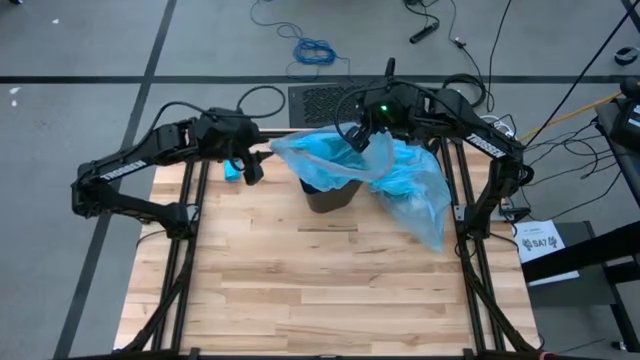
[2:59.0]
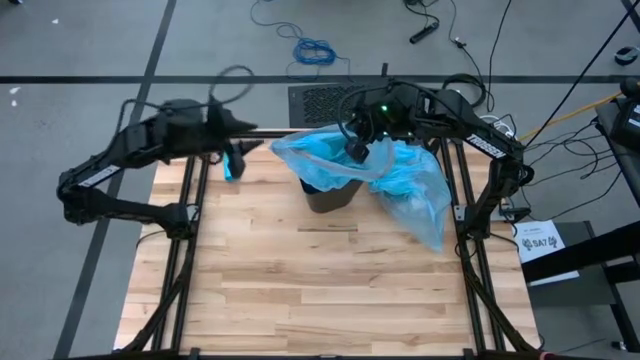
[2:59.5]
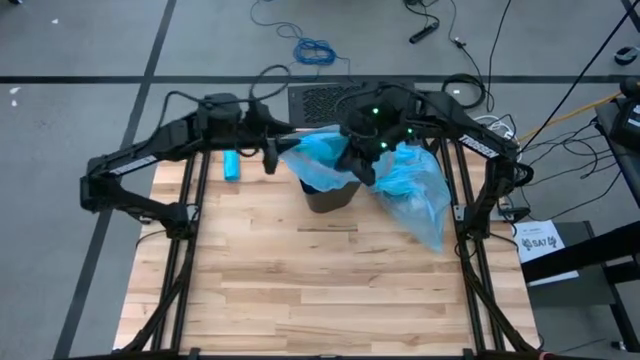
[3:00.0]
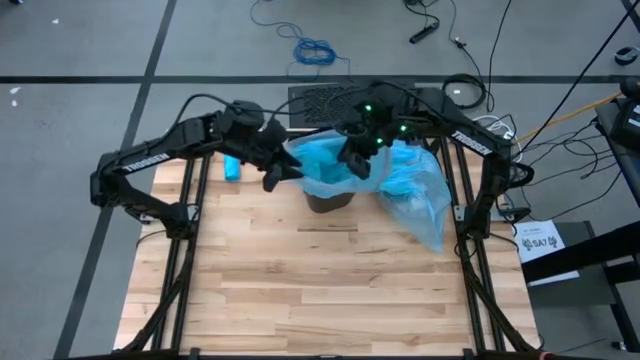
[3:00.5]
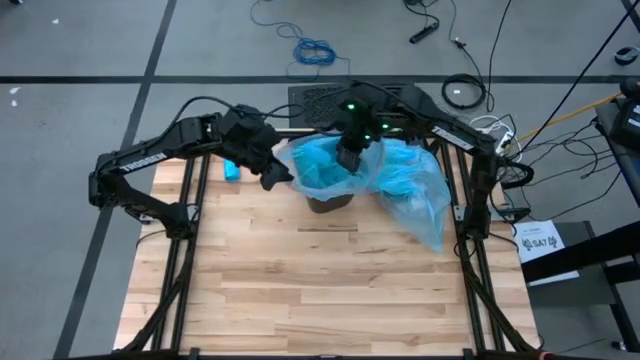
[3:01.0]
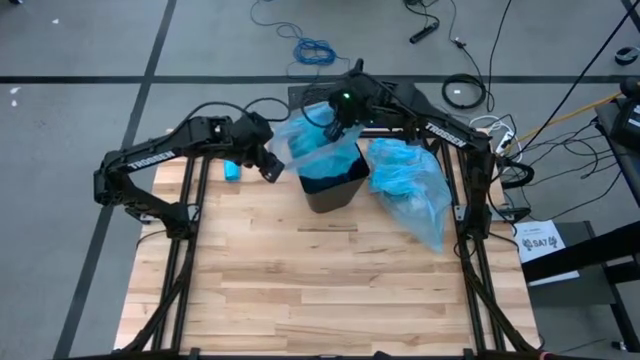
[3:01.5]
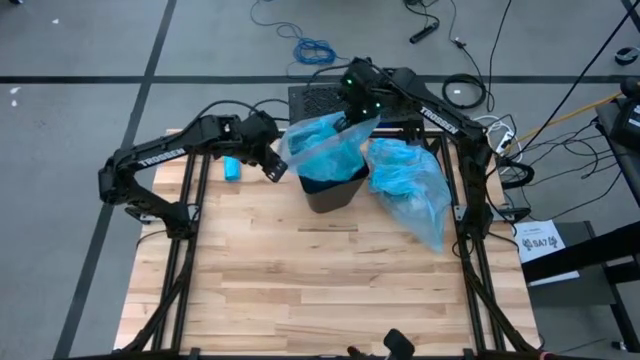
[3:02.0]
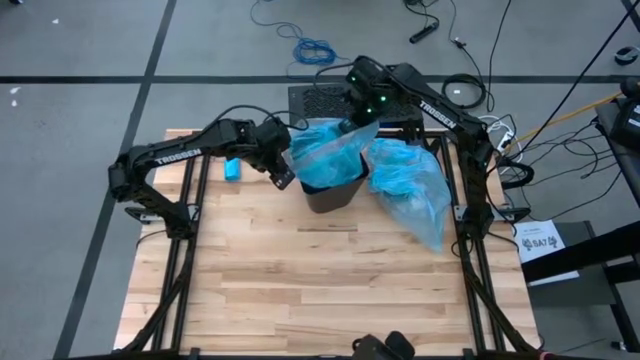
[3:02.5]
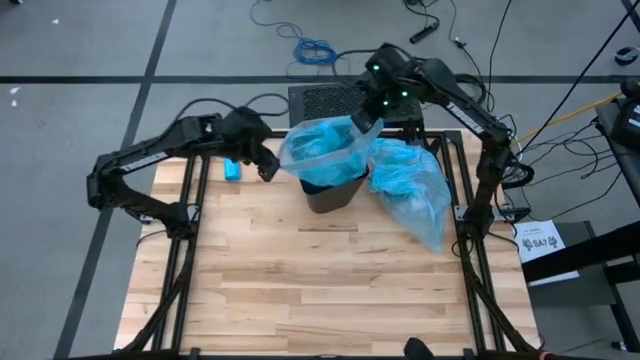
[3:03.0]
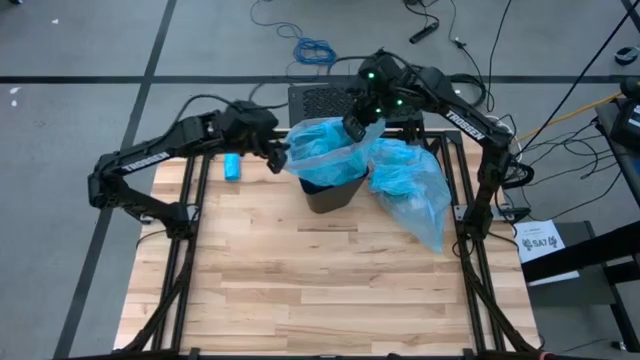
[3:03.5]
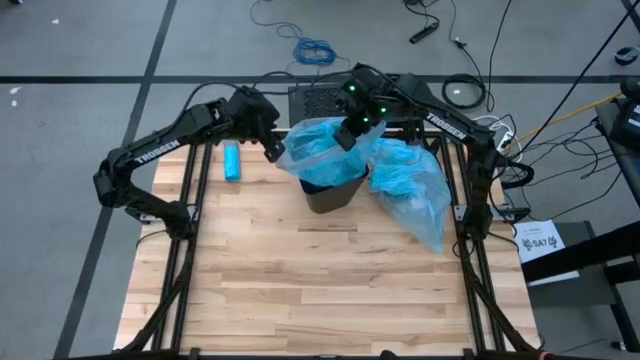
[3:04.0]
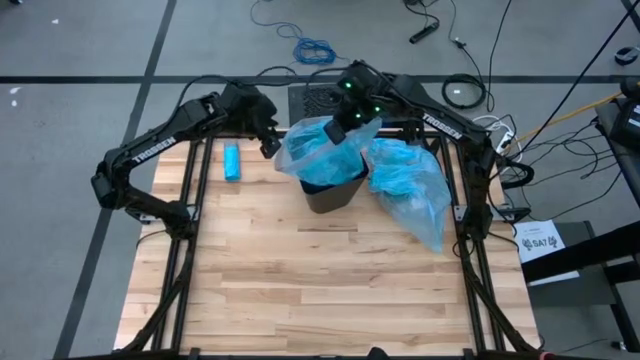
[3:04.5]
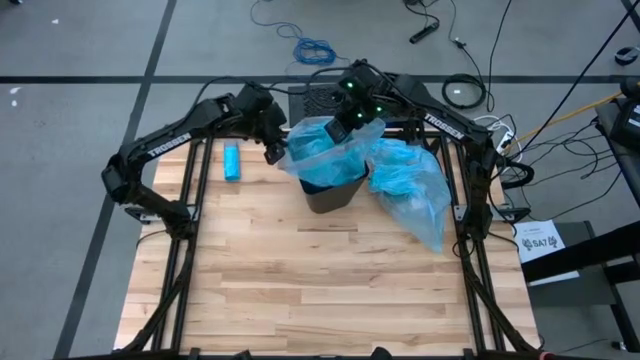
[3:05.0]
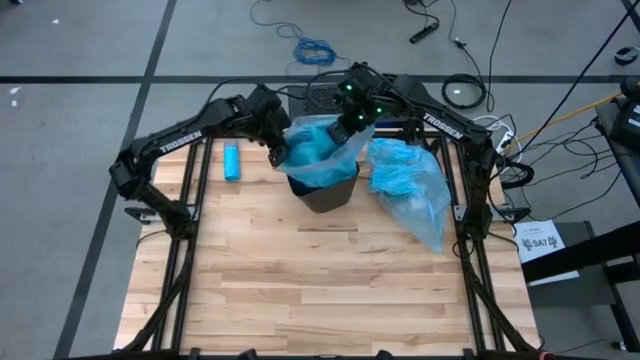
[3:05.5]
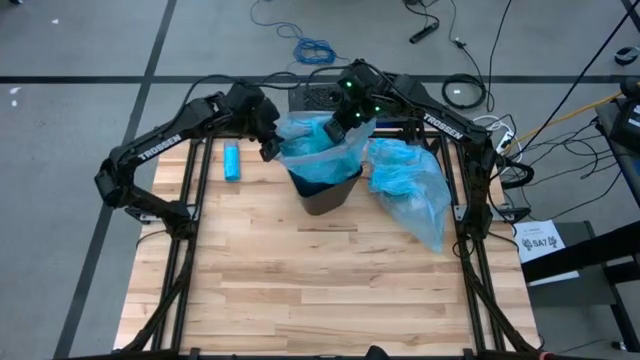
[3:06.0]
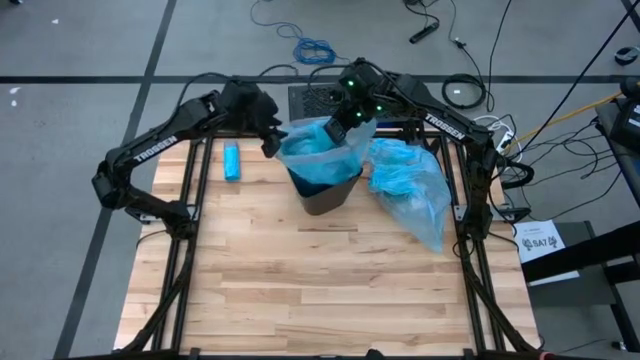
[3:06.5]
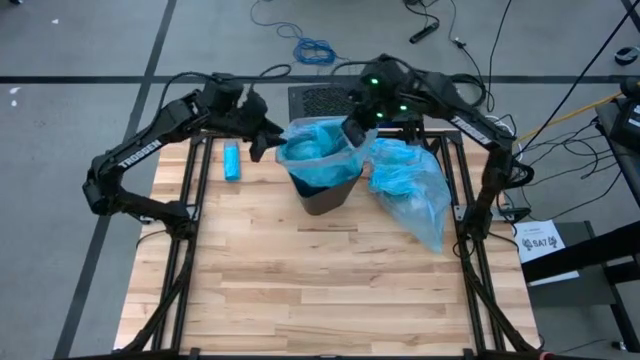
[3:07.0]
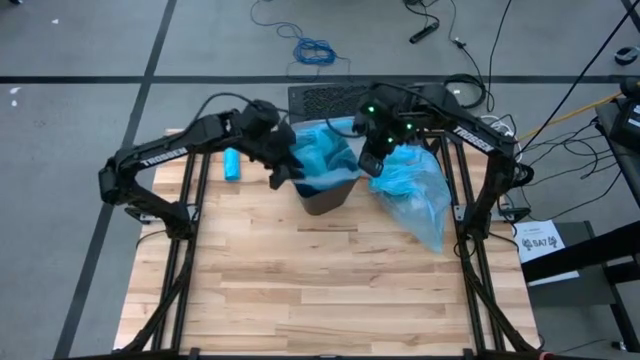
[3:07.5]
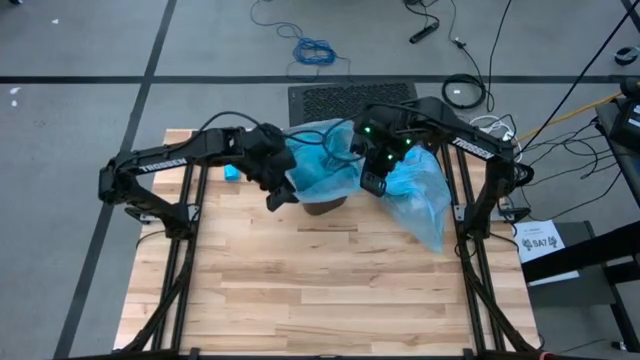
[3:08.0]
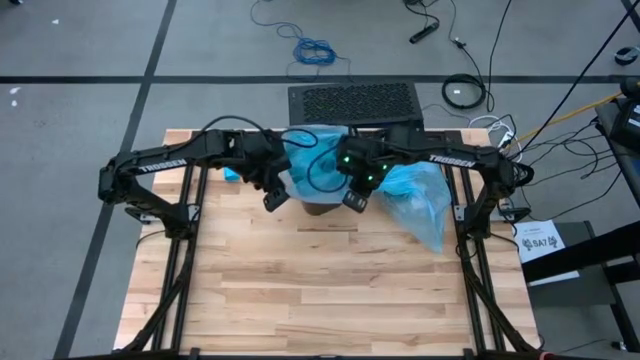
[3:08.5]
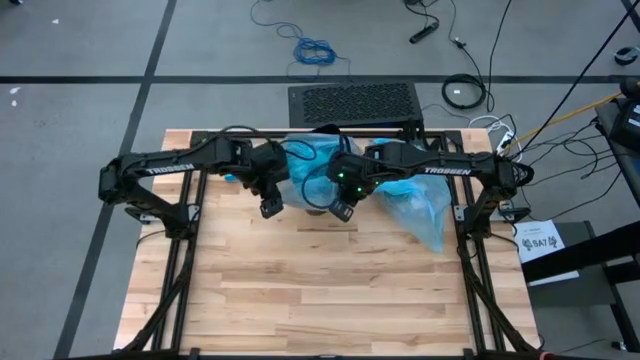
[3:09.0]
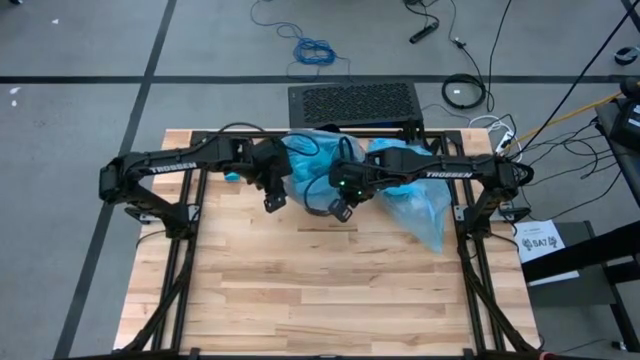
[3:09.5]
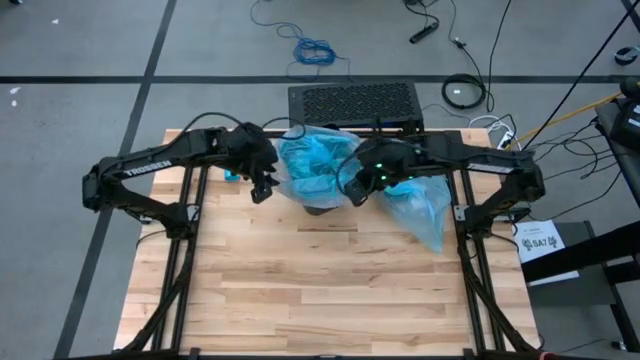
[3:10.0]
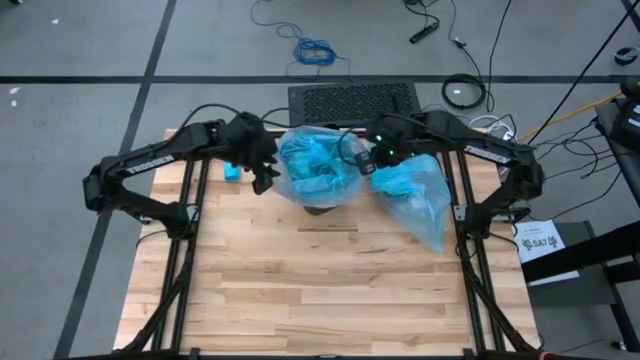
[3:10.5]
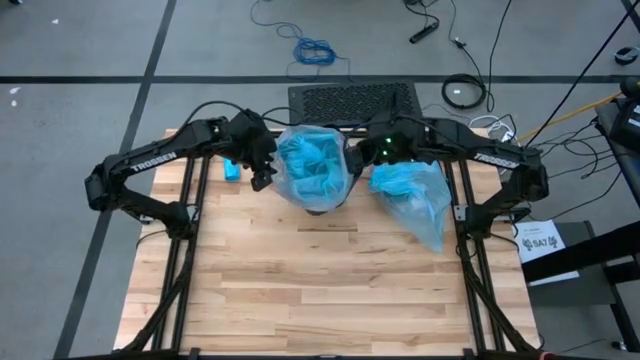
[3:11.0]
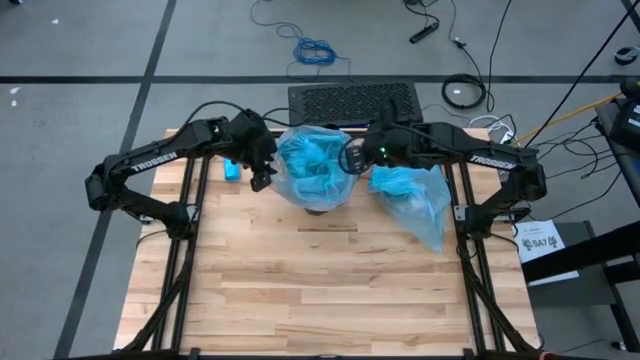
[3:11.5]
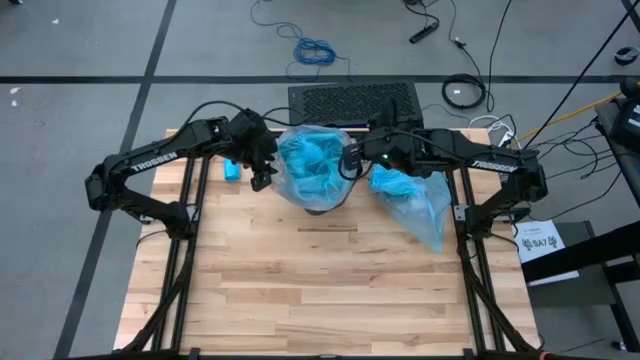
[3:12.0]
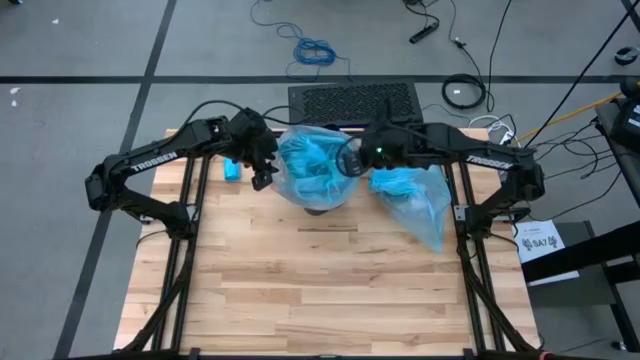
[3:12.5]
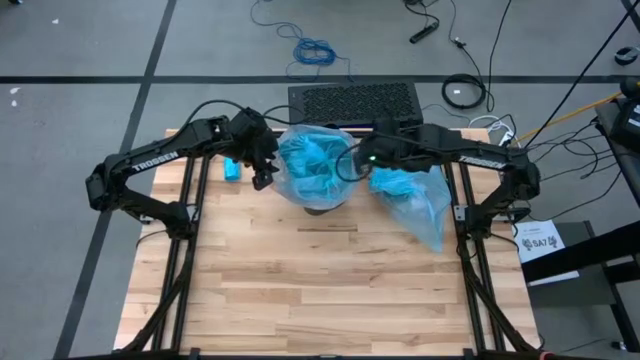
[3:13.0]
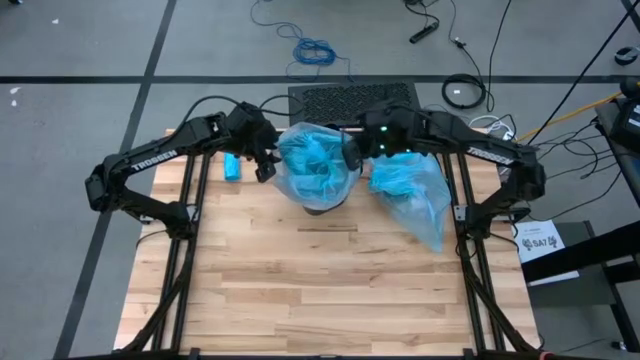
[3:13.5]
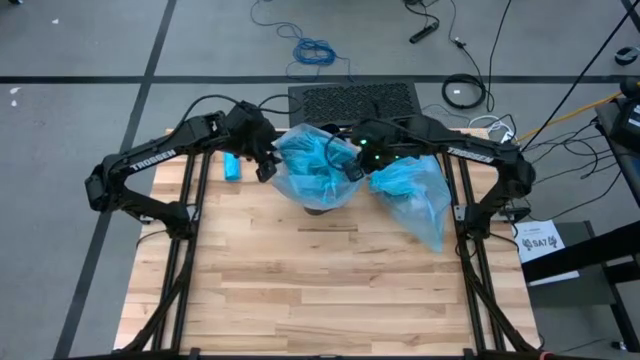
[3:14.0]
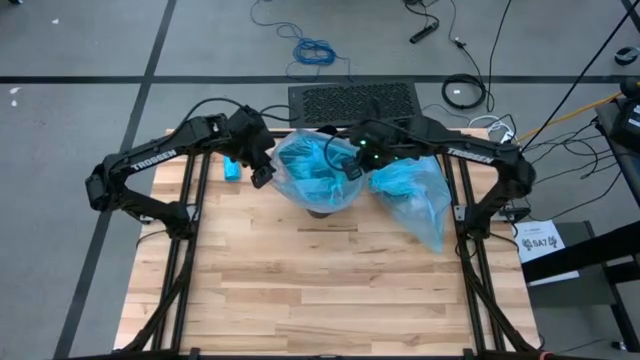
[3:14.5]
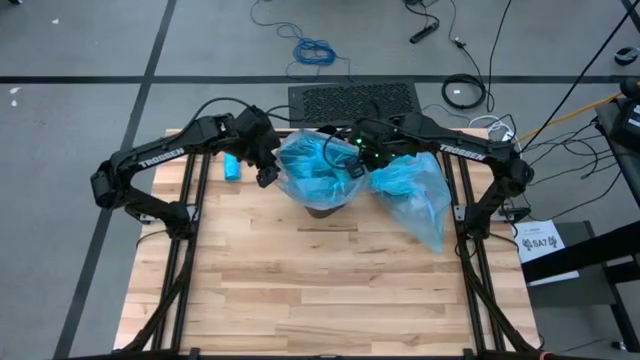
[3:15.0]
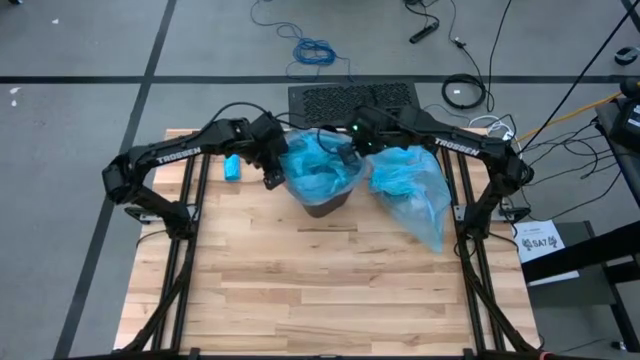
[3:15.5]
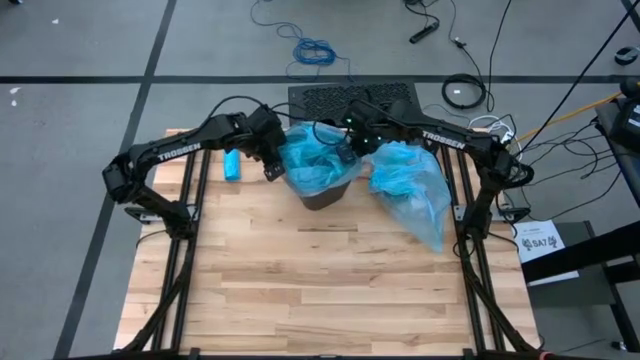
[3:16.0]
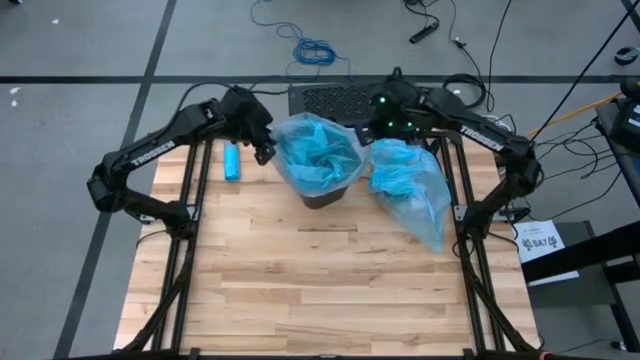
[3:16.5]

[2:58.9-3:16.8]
Task: place trash/remove bag and relplace
Insert the blue trash bag into the trash bin

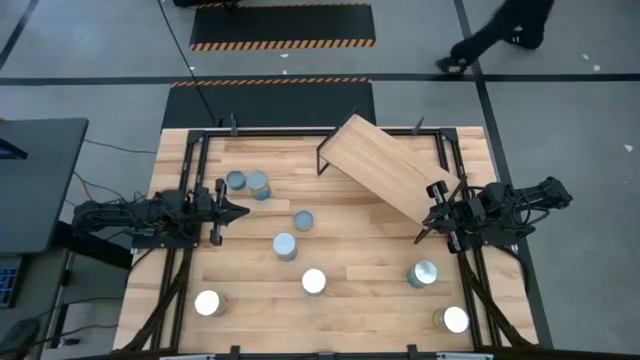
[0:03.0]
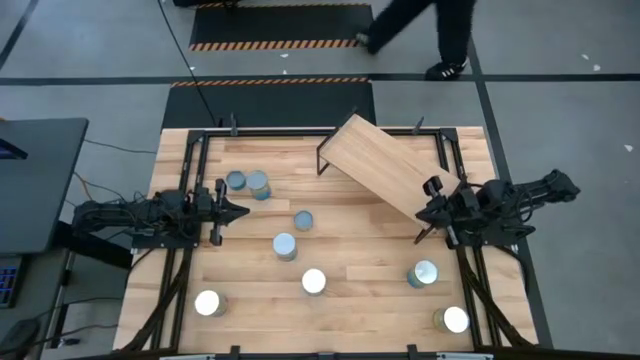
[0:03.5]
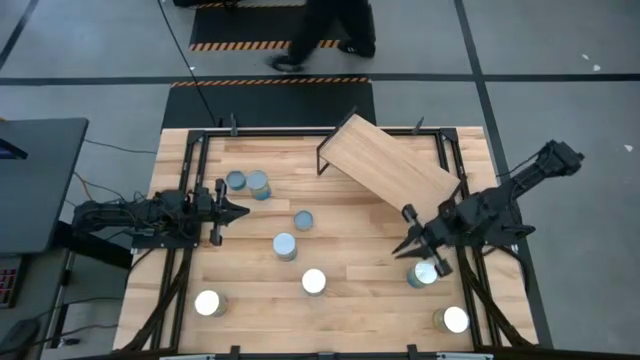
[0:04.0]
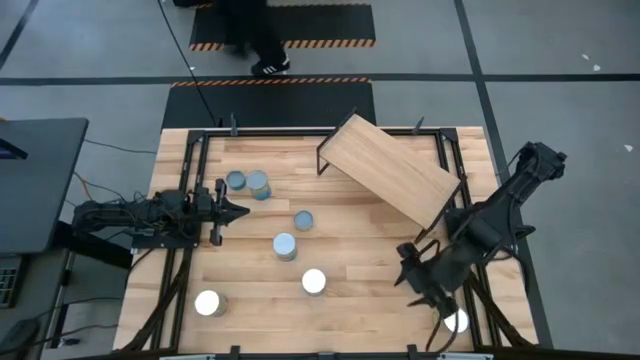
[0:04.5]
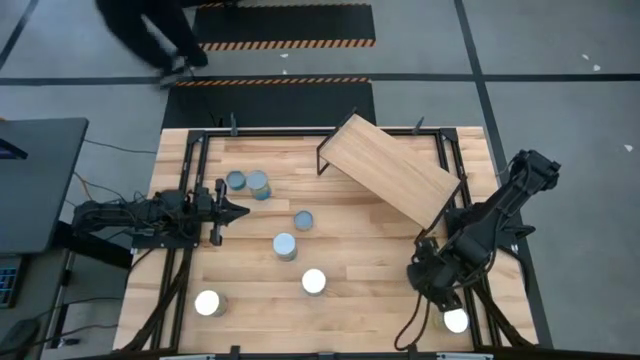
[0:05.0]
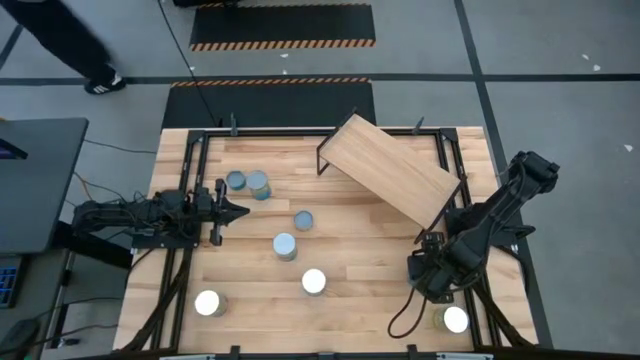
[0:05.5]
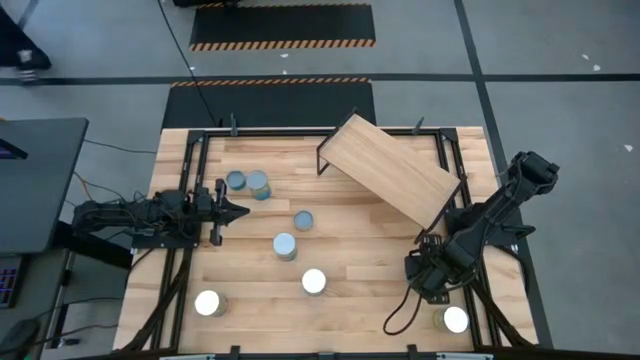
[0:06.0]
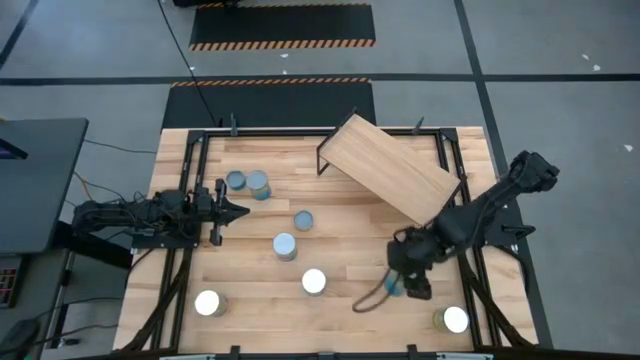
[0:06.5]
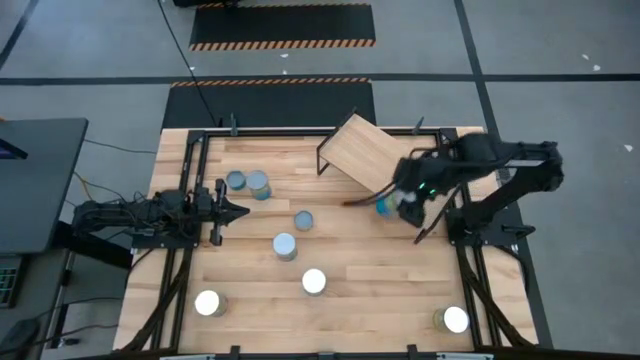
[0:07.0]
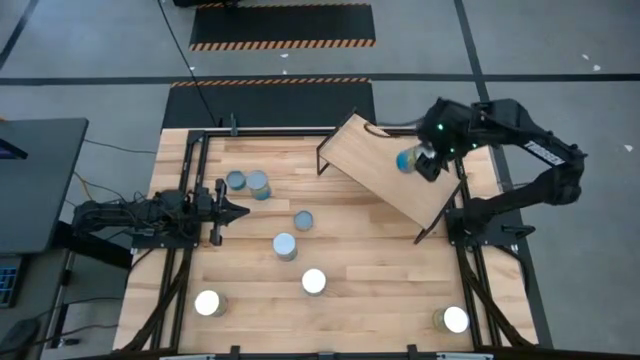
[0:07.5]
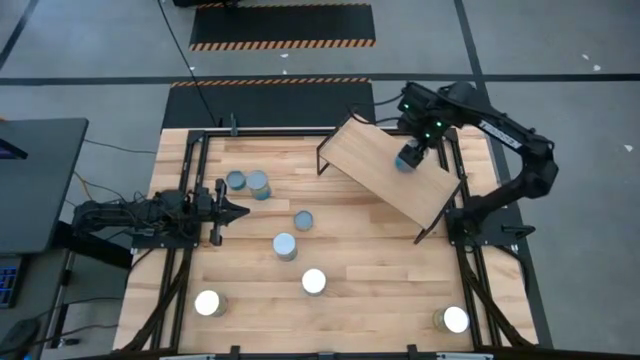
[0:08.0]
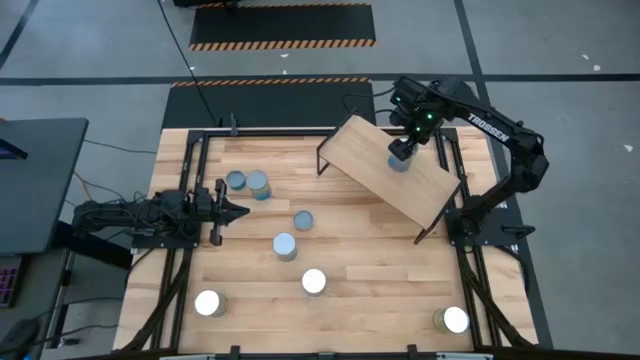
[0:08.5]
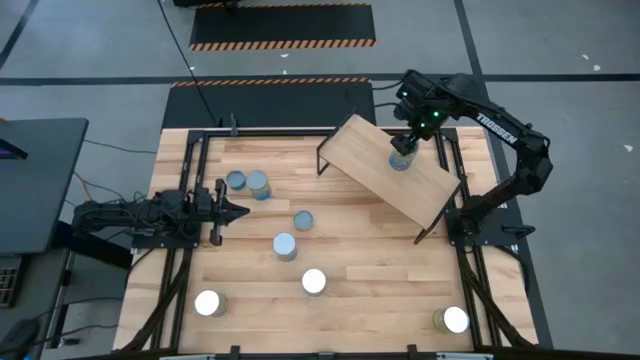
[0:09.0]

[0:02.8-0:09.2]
Task: Pick and place cans onto a shelf
Put the bottom canned cherries on the shelf
